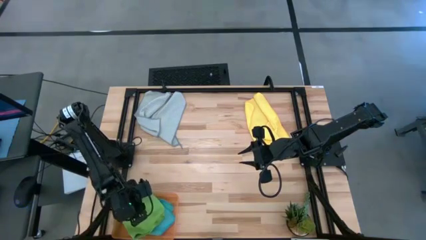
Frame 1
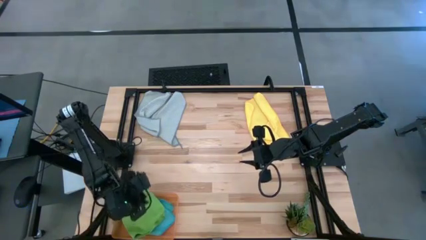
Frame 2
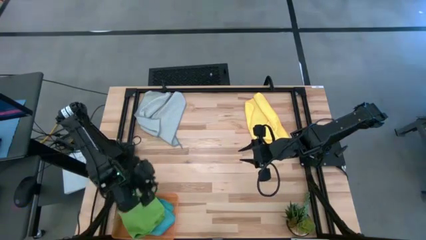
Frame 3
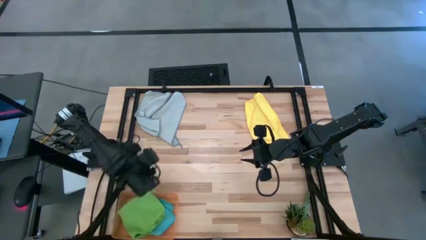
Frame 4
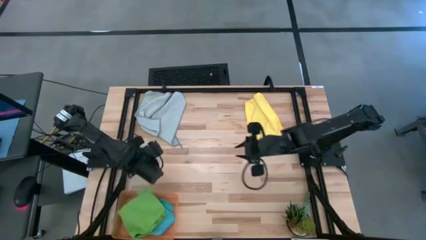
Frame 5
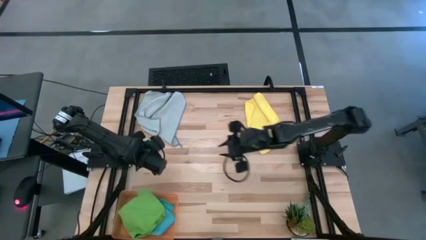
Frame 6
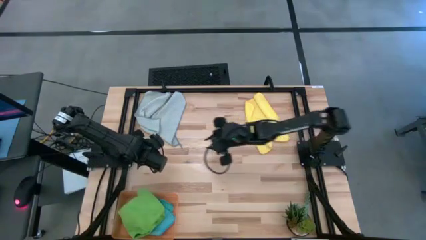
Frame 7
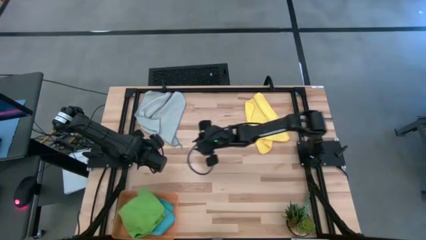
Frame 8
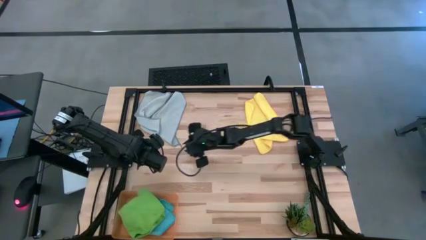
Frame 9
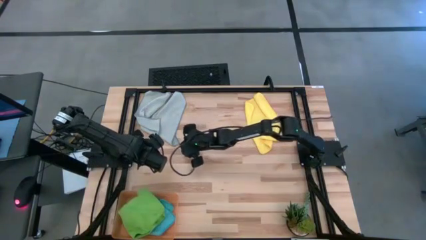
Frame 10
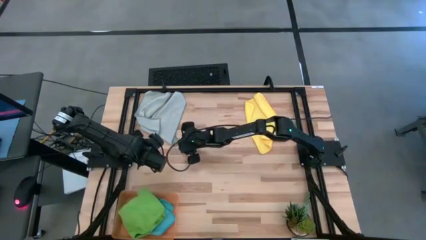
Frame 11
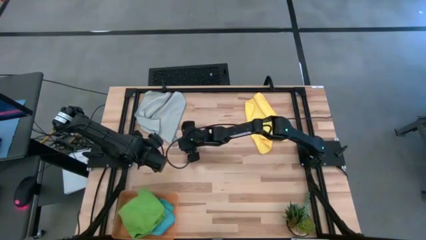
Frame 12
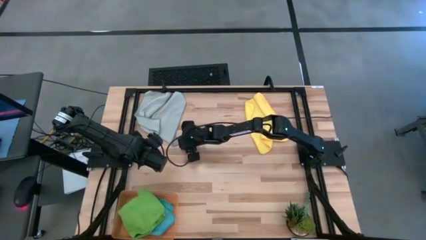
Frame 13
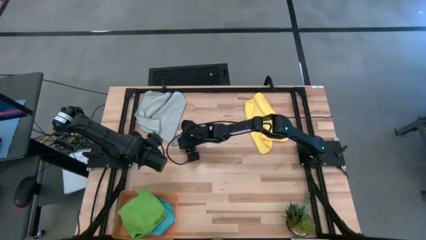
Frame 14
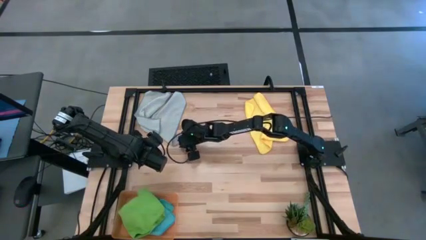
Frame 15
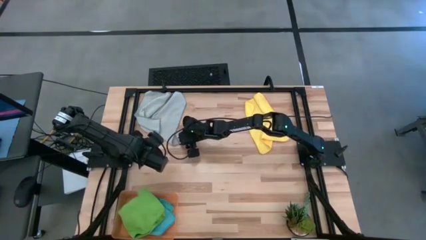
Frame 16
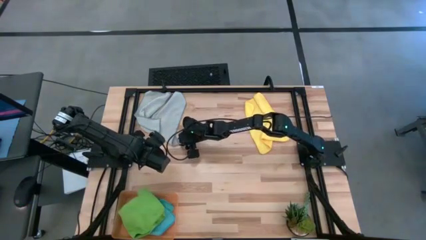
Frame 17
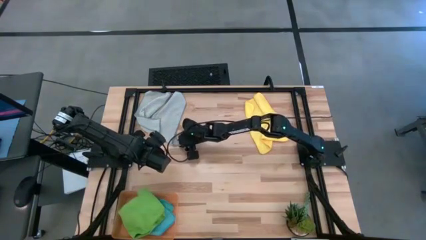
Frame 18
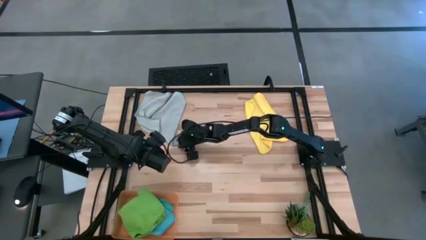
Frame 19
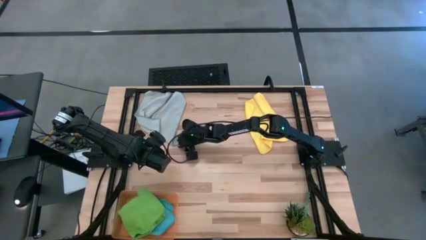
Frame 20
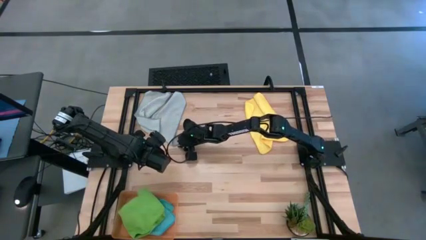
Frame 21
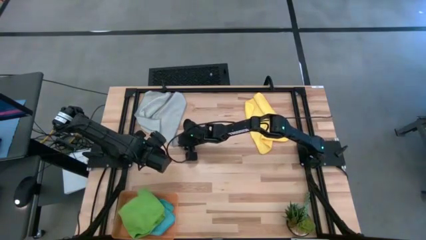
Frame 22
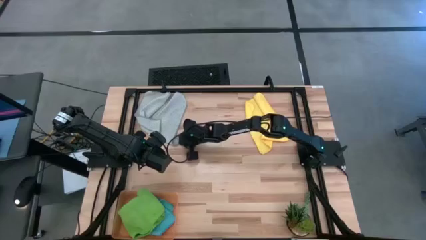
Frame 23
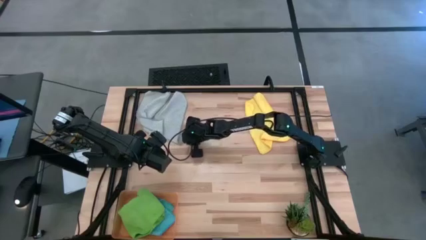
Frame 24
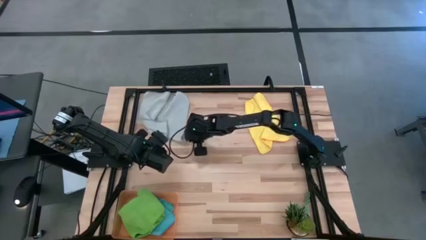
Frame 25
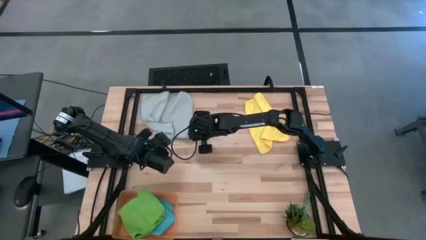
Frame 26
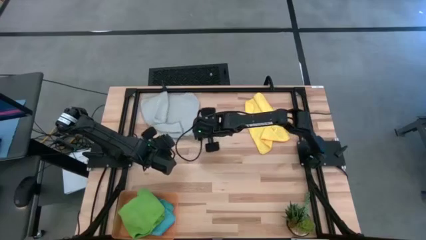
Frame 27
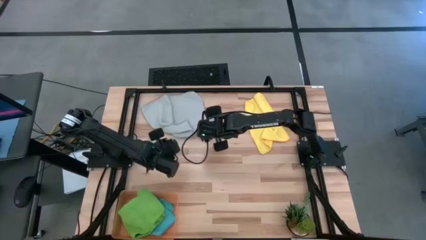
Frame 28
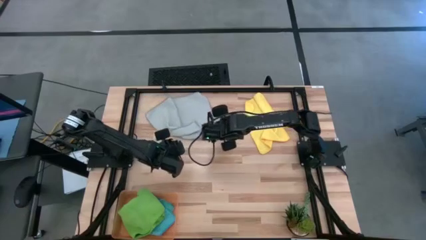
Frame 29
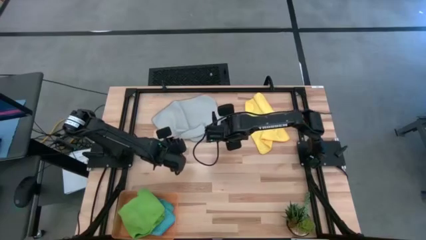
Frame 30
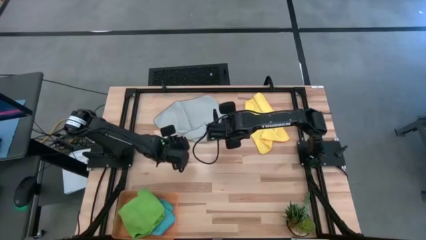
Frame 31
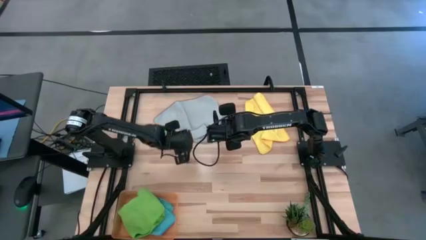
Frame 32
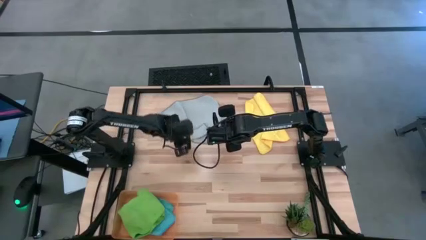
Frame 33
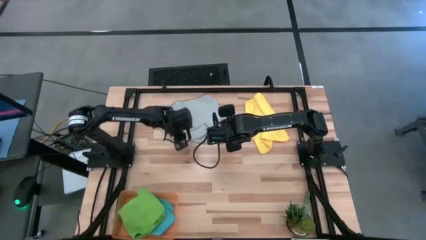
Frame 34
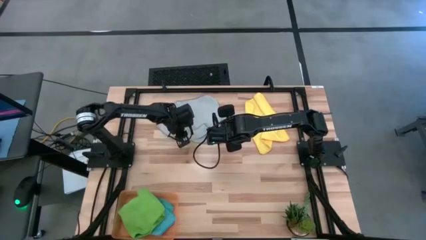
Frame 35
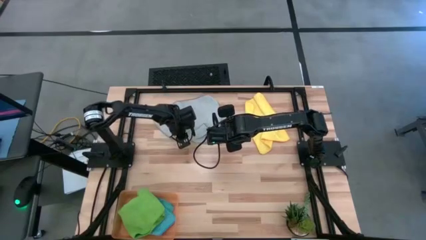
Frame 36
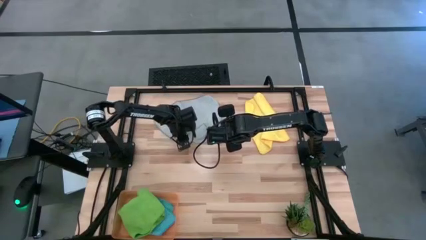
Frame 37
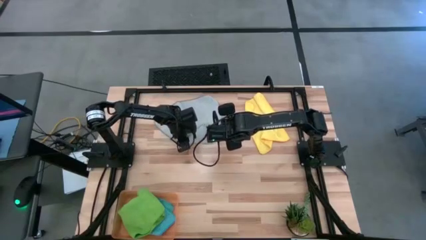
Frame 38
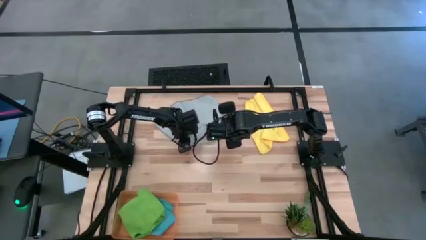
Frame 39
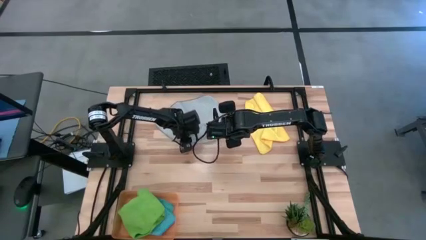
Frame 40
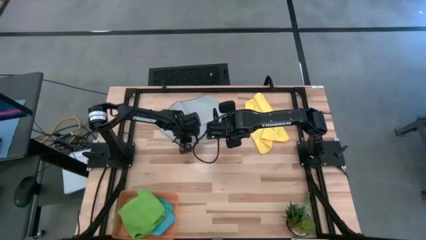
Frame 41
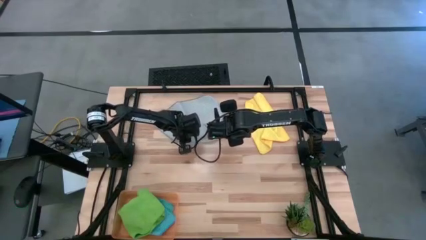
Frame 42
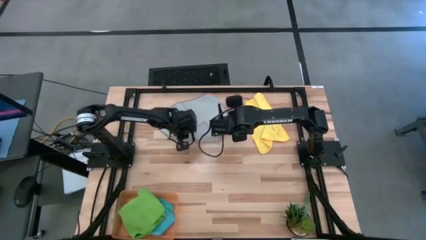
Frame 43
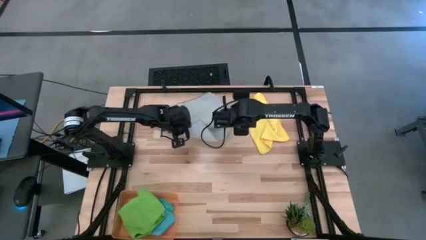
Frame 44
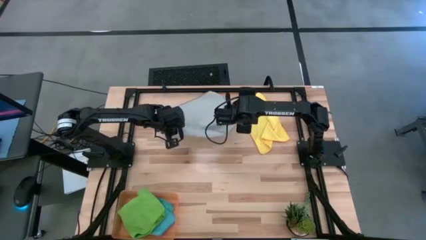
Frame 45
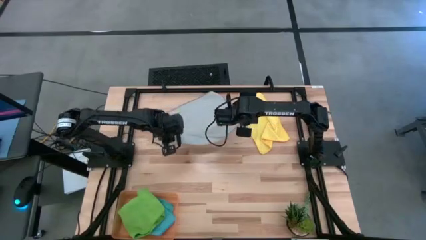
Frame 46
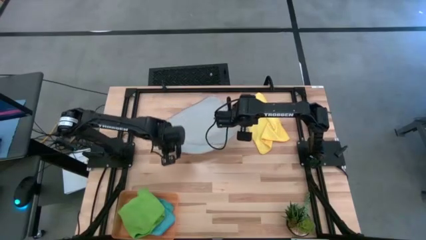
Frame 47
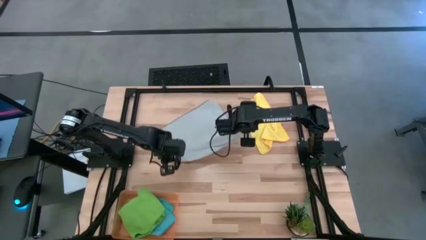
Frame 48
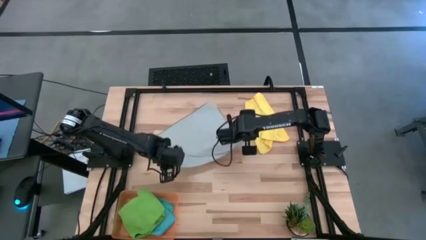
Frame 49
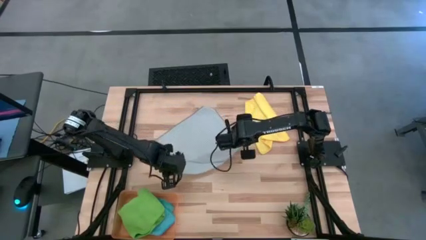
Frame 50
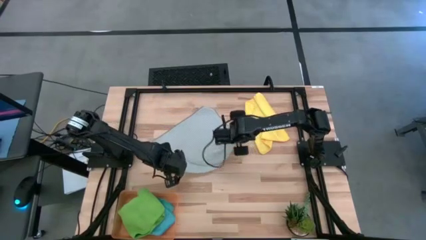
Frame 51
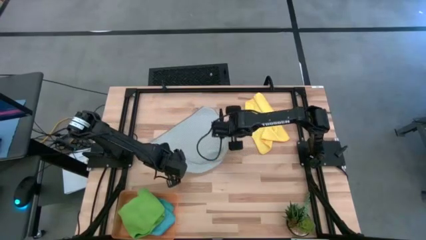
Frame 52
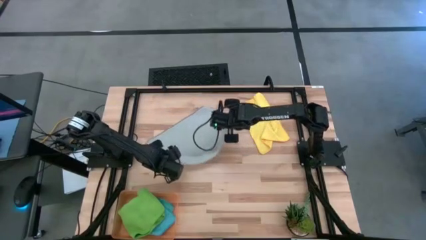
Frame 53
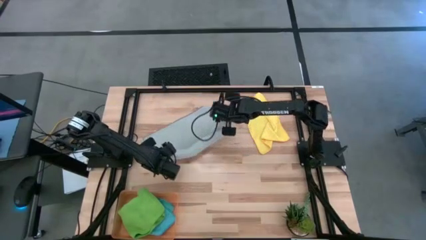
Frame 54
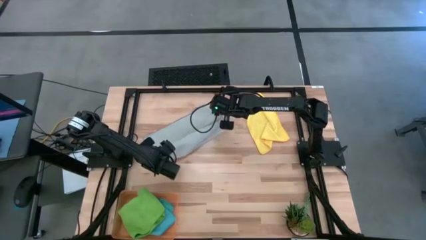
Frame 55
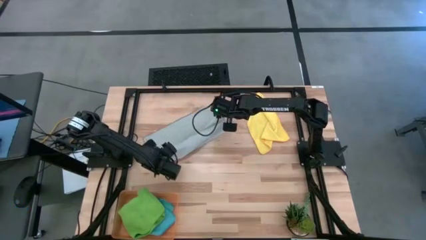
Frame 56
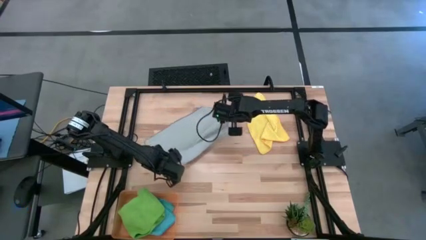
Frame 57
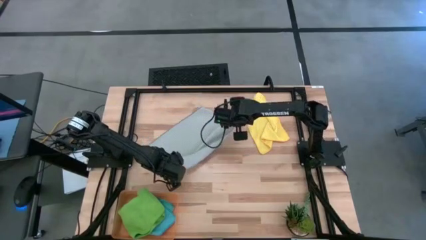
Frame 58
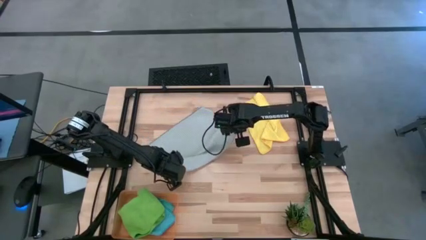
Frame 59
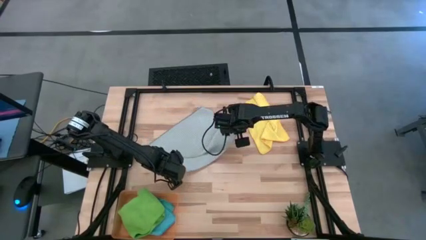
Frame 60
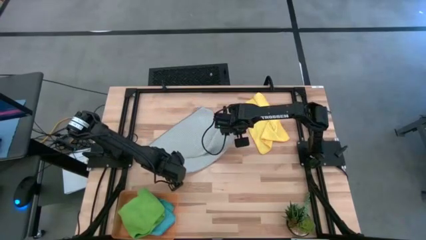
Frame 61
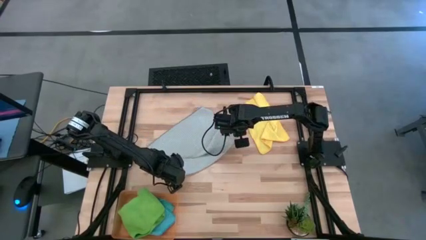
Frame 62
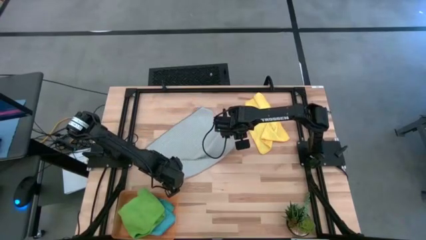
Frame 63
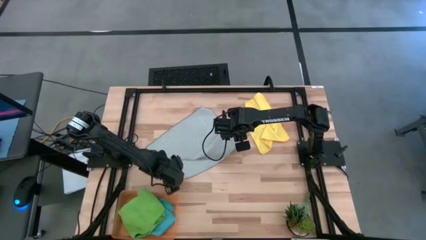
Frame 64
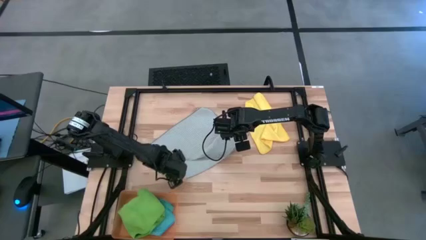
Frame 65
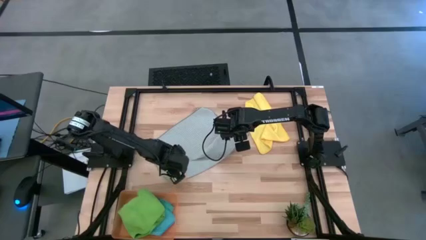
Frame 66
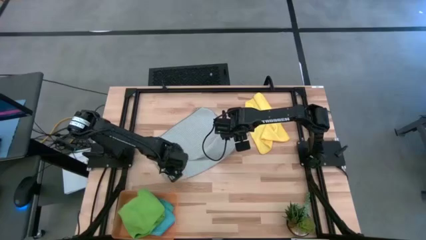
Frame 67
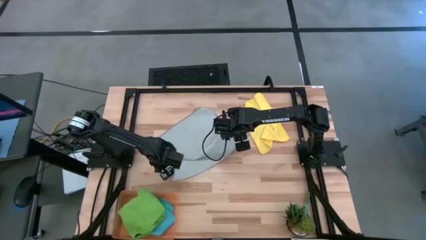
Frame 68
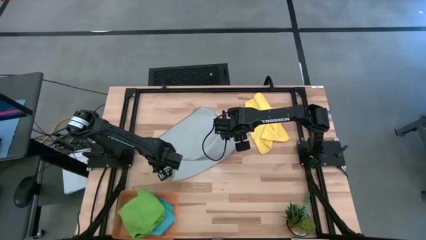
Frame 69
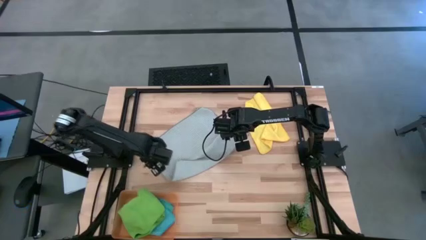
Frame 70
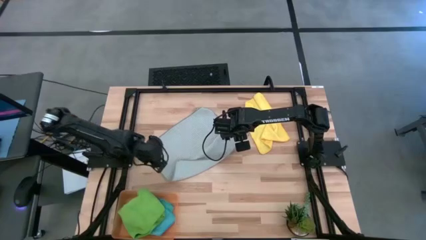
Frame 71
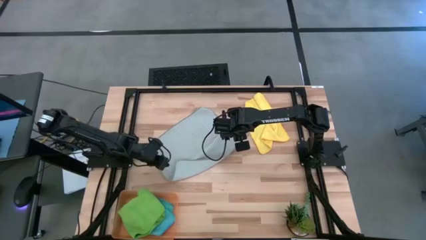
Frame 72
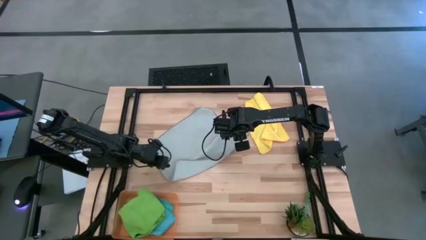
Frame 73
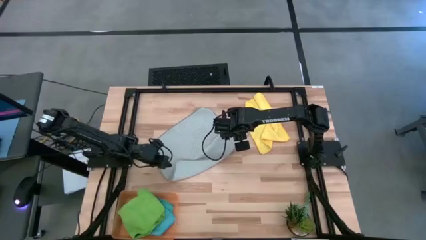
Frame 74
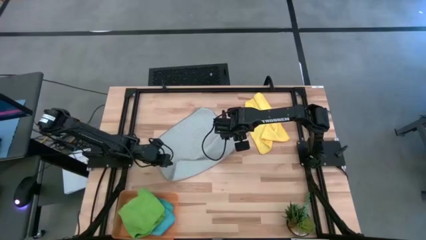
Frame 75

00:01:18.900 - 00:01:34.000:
Task: Fold microfiber towels
Fold the gray microfiber towel

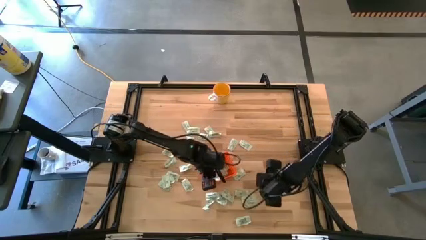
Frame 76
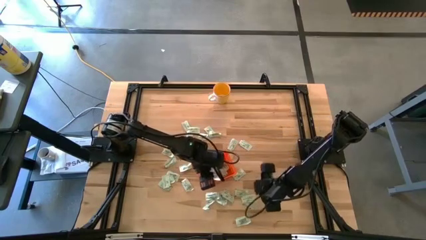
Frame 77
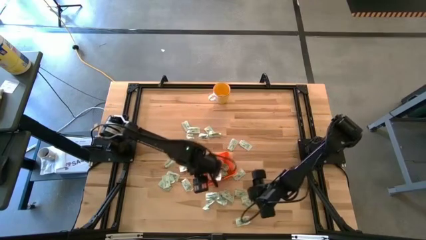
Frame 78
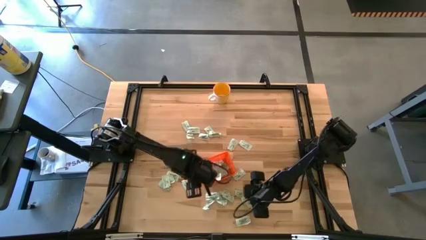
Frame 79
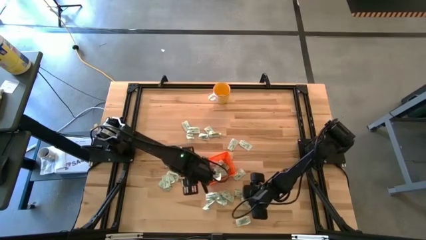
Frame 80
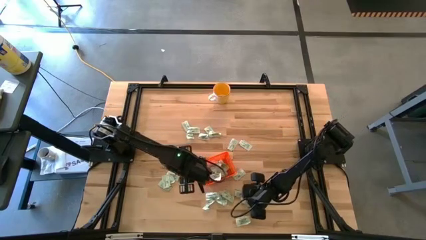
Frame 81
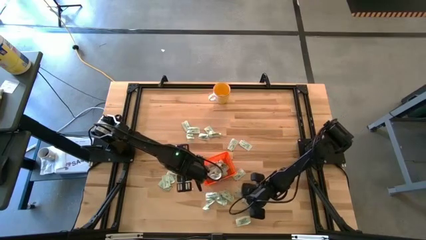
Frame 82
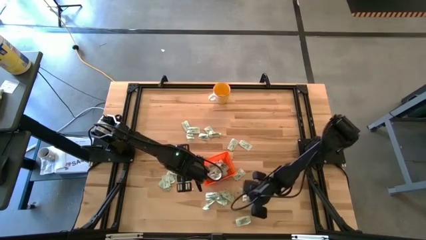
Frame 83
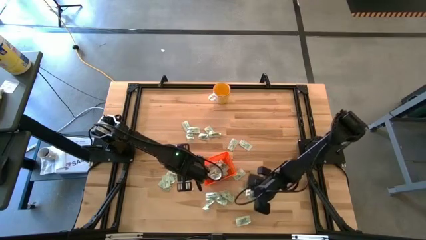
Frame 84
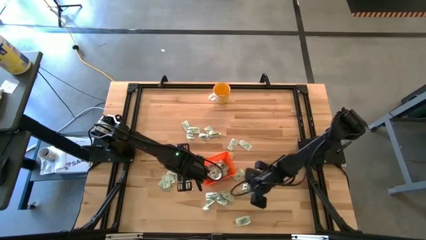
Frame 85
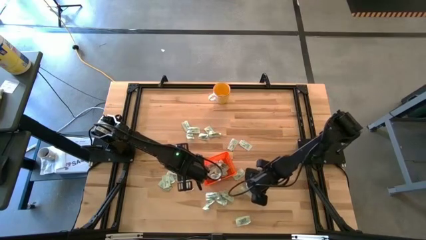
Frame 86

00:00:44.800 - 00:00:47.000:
Task: Pick and place Stevia / Truvia into bins
Put the stevia packet into the bin

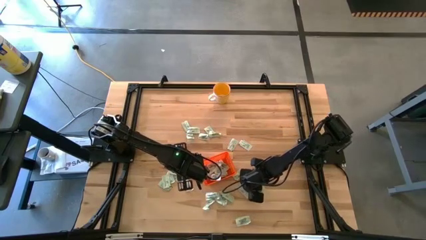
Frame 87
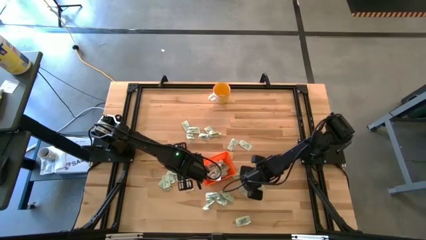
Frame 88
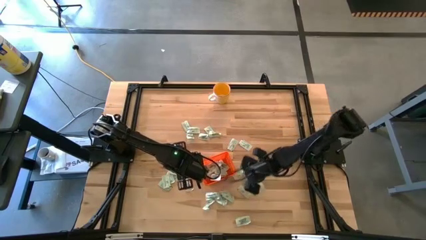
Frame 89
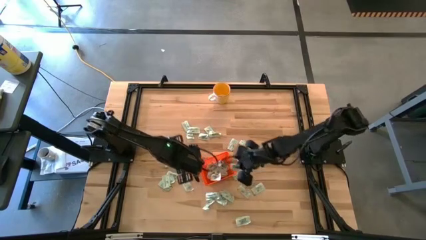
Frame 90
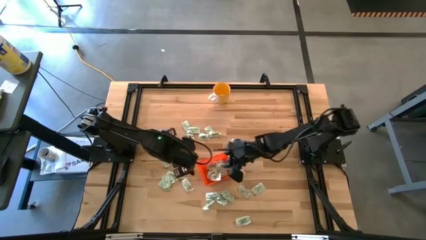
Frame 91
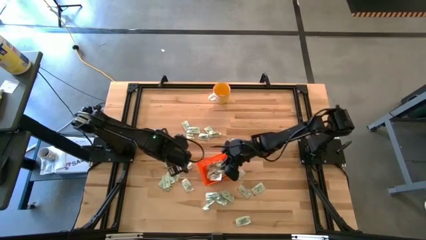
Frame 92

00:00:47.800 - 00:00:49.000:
Put the stevia packet into the bin
